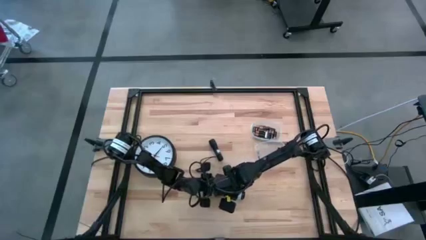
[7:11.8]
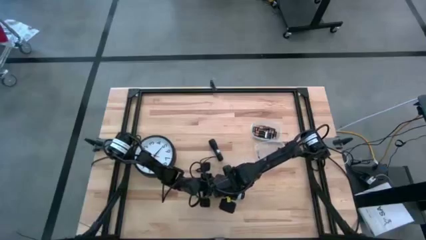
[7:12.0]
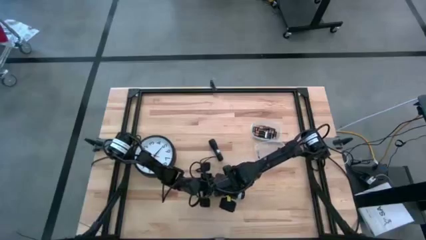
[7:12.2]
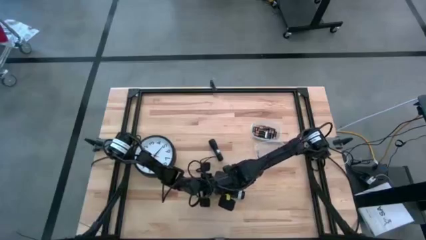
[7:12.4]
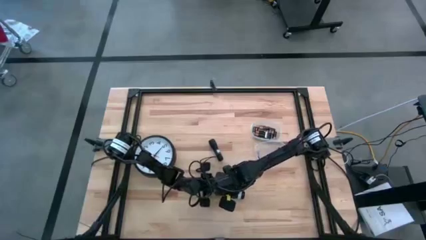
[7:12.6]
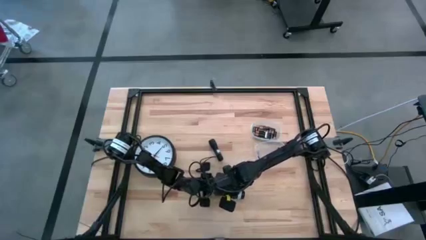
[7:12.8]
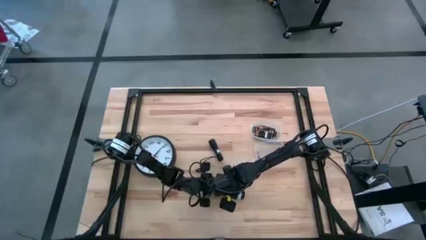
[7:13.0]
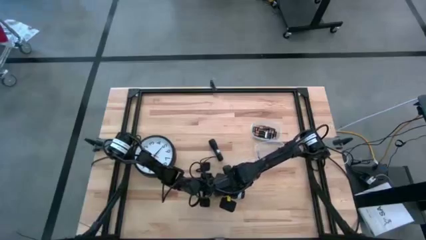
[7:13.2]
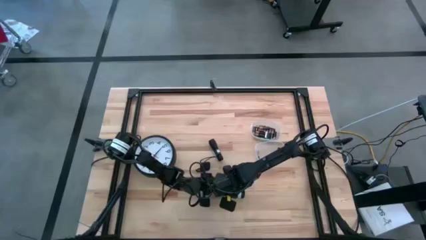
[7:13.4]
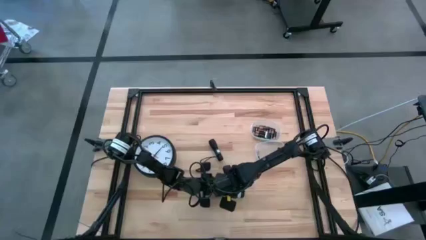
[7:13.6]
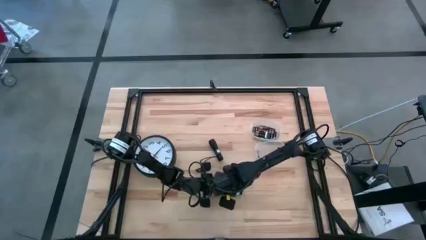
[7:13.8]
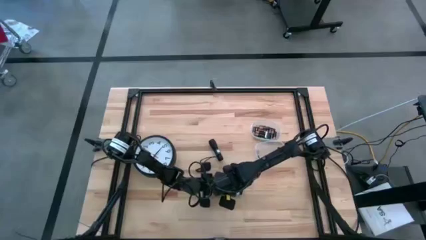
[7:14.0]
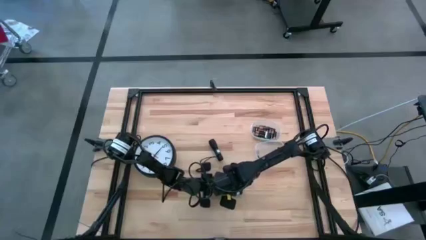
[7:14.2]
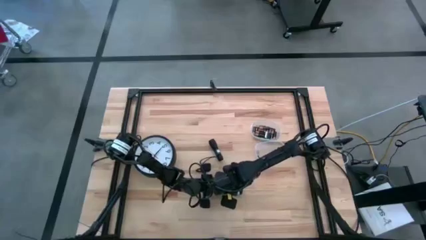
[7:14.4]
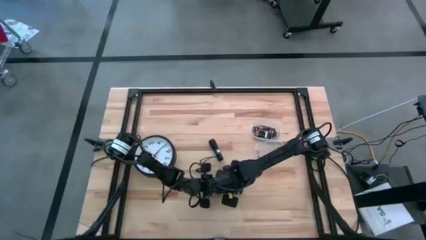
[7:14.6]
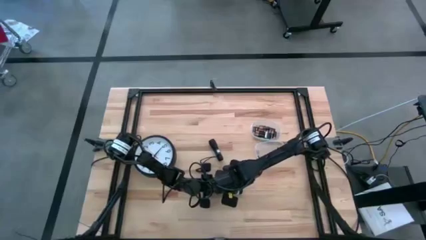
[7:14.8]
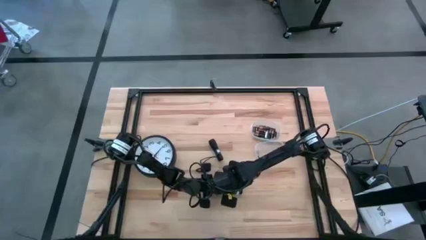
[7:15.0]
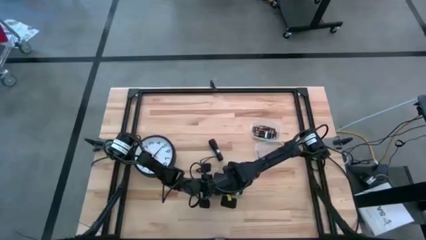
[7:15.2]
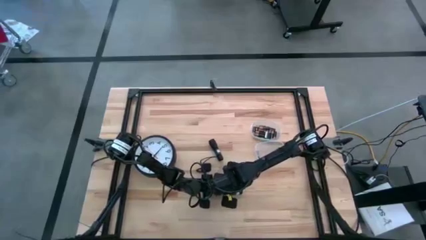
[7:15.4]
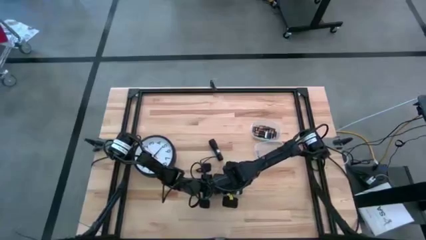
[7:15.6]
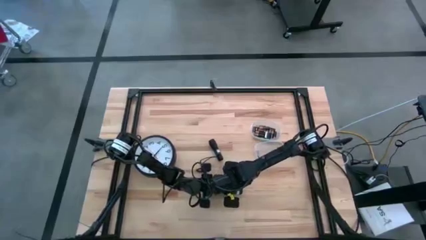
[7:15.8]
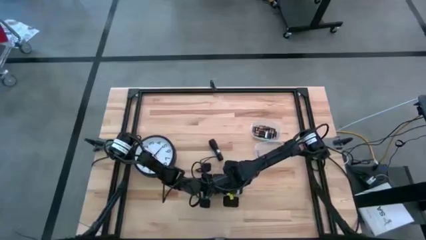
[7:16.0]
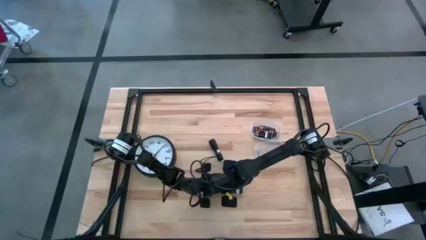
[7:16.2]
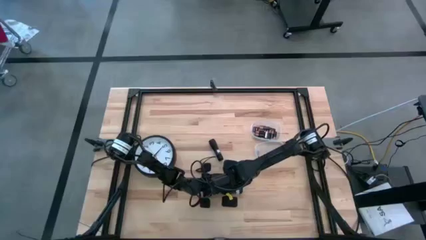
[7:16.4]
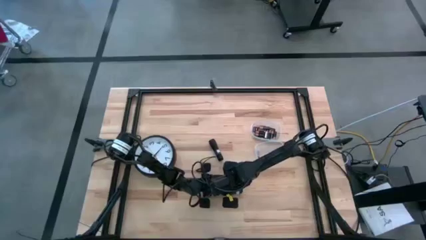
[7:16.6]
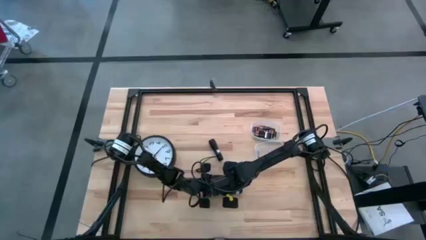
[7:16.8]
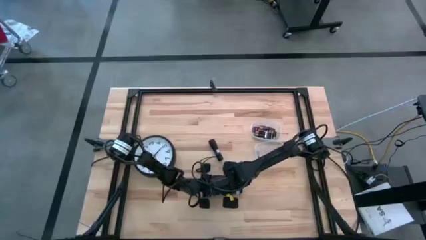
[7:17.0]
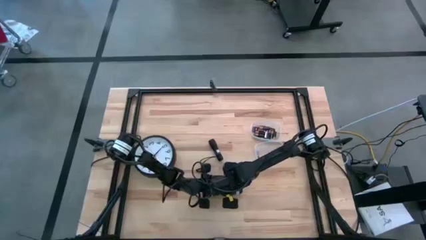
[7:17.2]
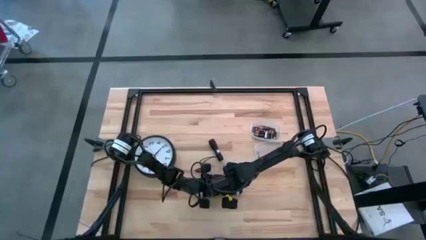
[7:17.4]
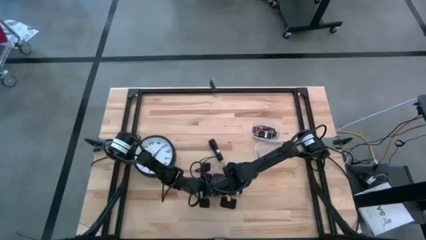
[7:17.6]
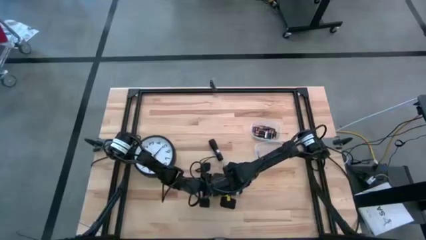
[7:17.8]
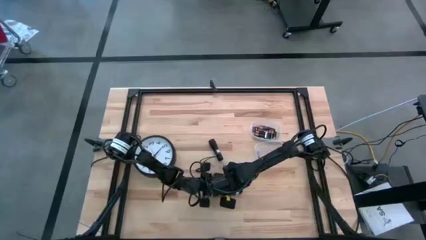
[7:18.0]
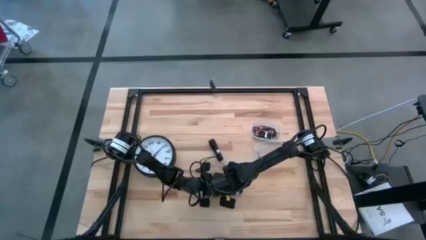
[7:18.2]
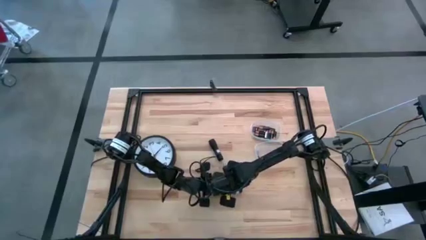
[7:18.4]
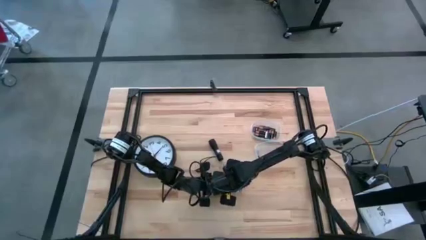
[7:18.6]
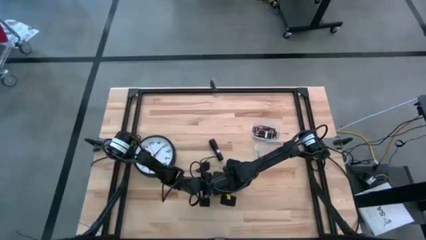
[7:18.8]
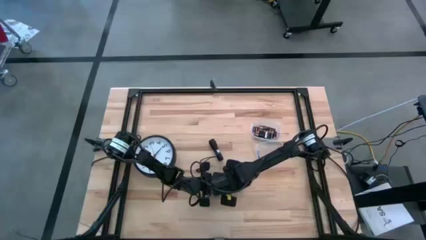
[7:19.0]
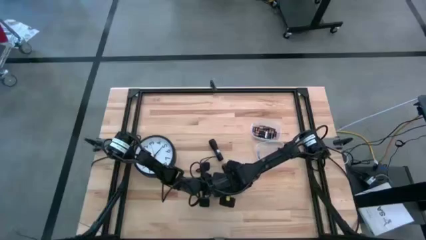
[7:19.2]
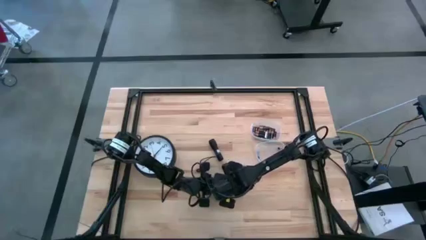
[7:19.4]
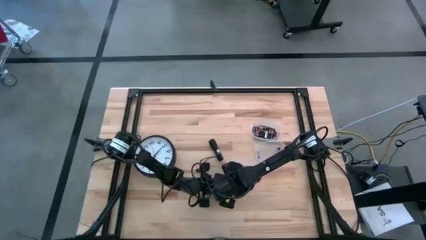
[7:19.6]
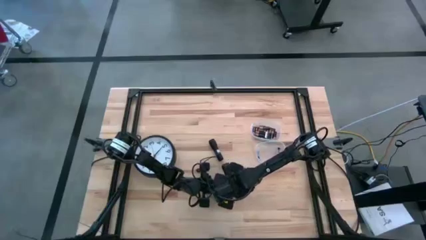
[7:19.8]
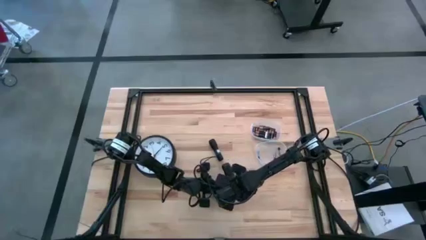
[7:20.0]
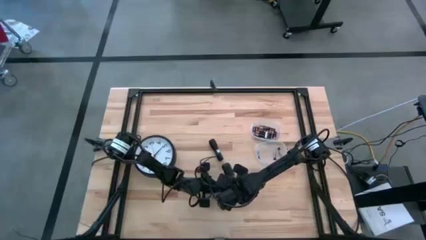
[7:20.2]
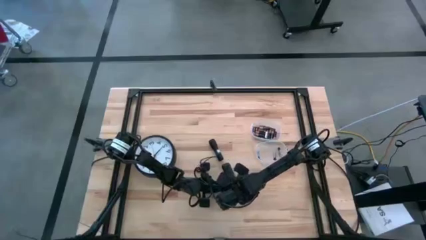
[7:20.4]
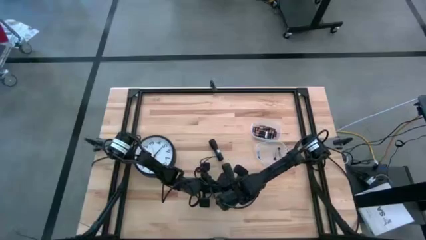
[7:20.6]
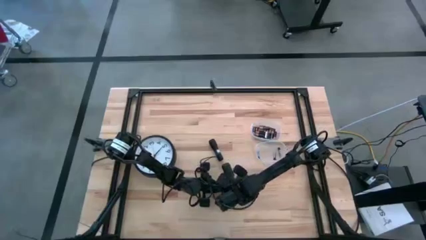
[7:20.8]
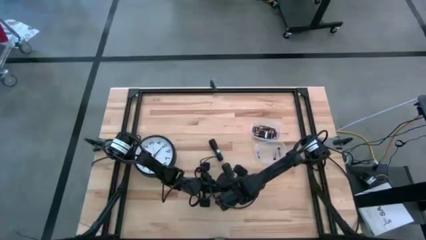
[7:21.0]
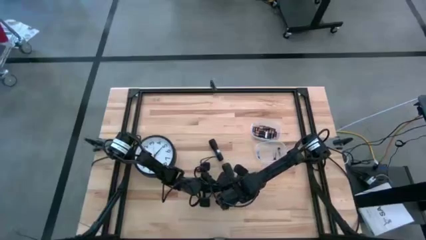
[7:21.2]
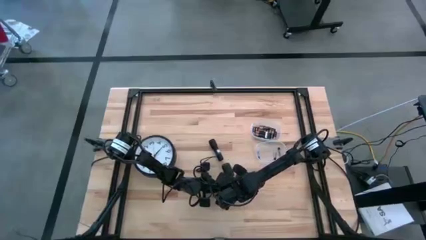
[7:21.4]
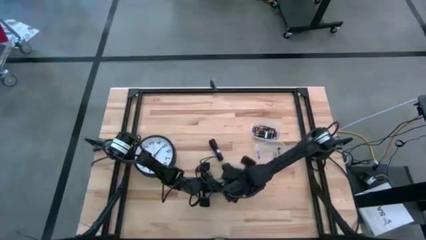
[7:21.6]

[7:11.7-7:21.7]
Task: Insert battery
Insert the silver battery into the remote battery compartment

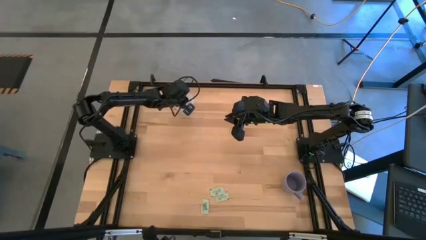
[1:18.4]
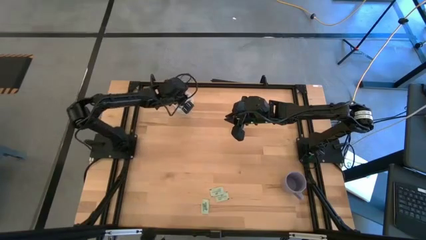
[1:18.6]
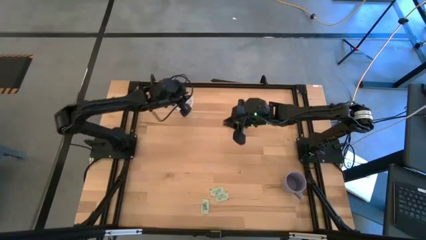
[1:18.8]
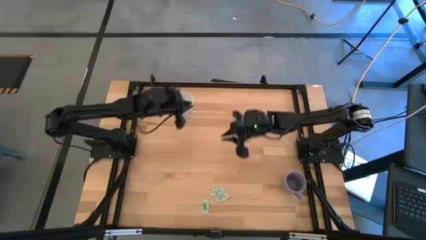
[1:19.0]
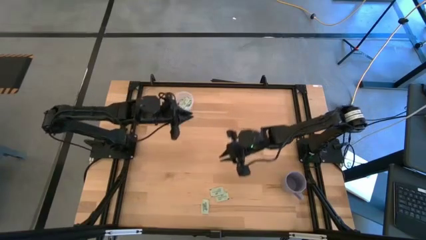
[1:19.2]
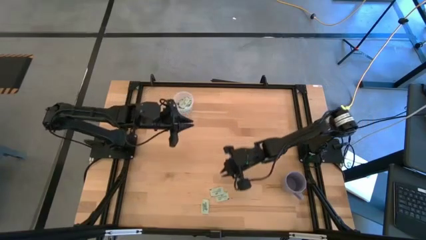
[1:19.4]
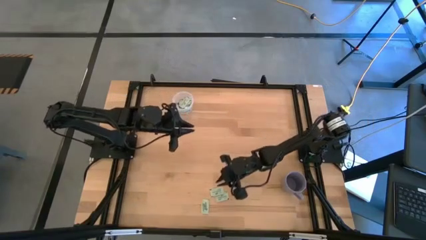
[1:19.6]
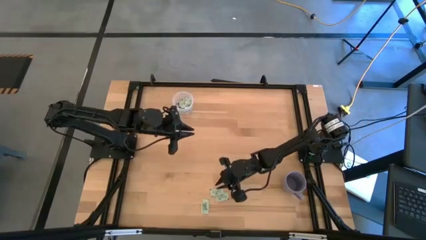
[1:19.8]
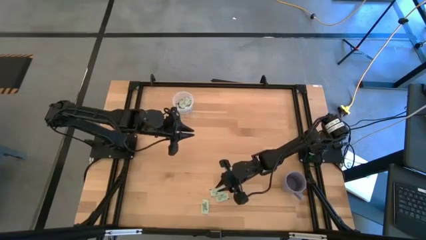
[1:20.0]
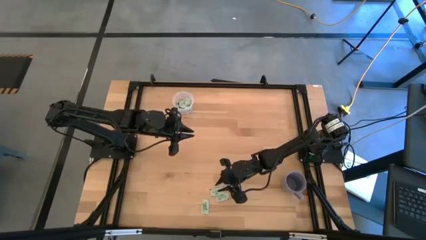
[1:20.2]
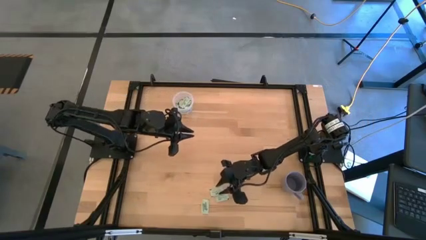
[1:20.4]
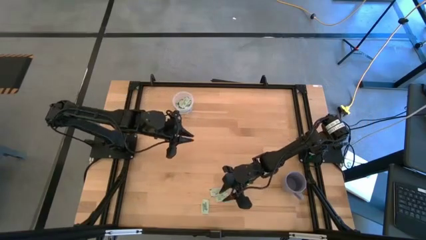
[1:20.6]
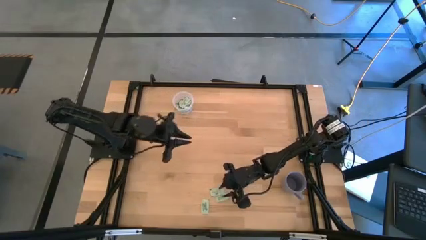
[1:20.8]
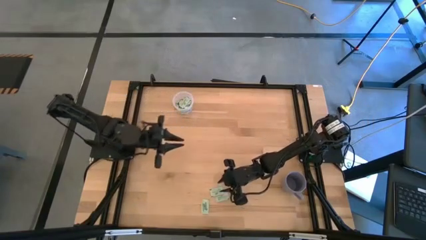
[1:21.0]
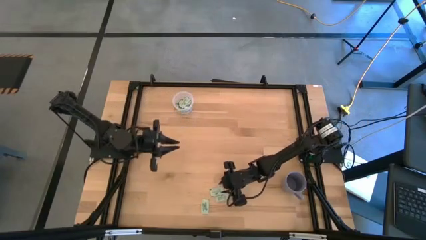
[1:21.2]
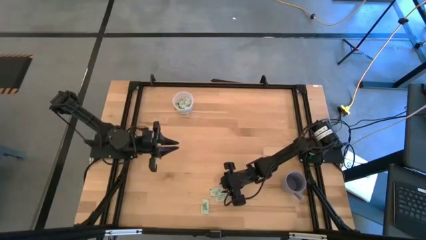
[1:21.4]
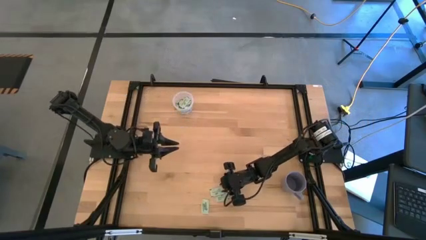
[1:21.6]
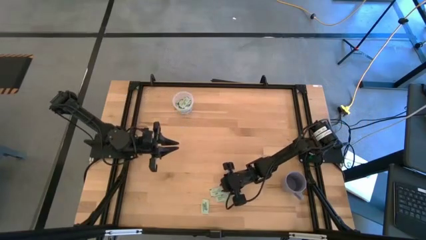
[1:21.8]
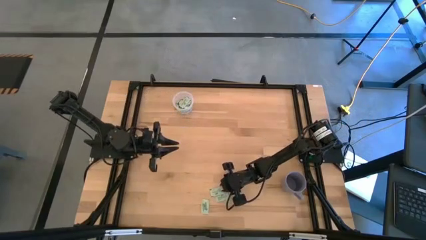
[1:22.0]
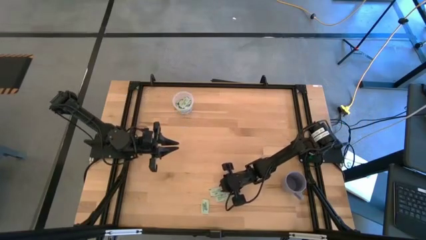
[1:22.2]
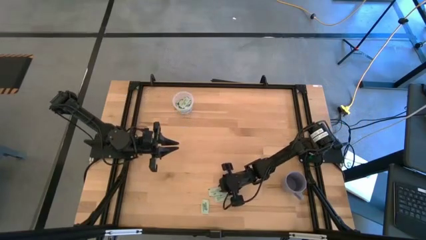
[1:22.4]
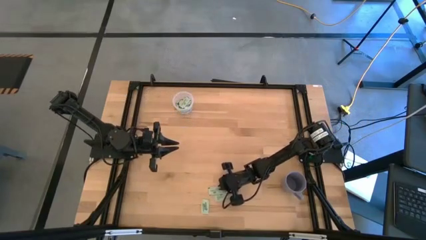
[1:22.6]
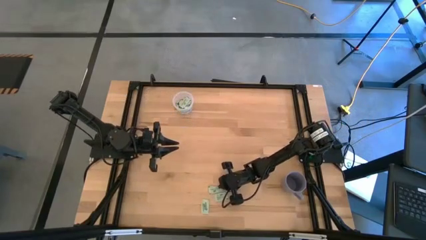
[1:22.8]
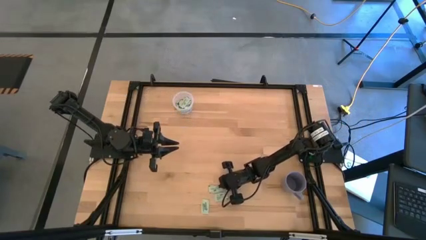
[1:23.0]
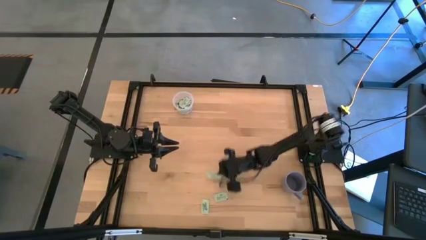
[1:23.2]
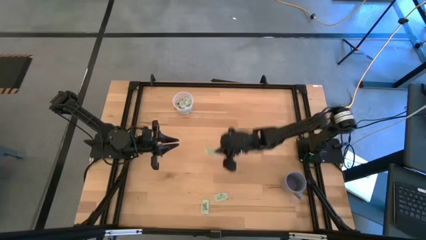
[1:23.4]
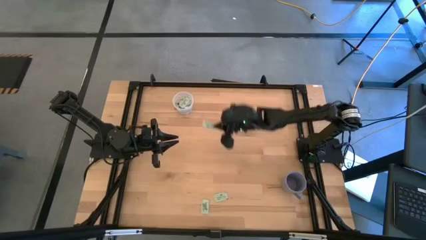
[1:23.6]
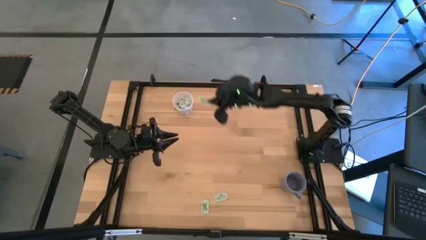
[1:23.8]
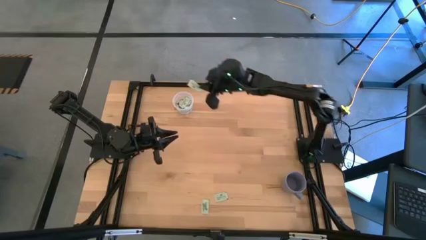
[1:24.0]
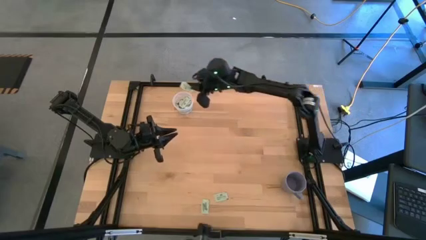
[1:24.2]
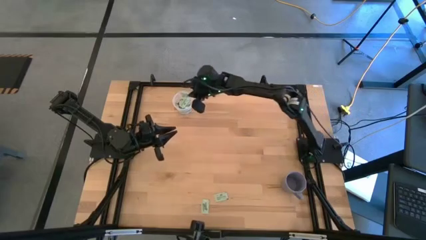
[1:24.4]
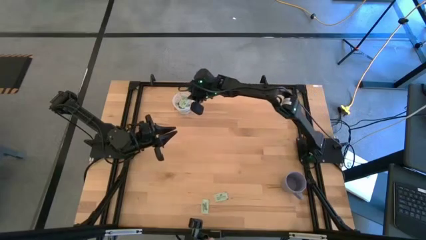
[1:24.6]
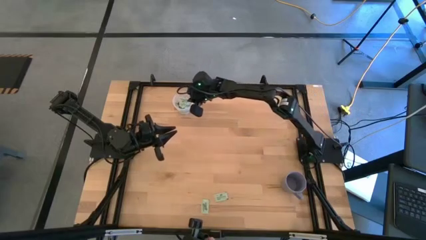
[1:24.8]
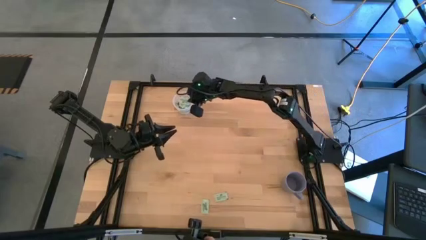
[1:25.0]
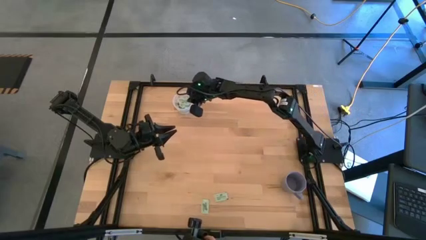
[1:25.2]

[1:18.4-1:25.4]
Task: Pick and place items into bin
Put the stevia packet into the transparent bin
